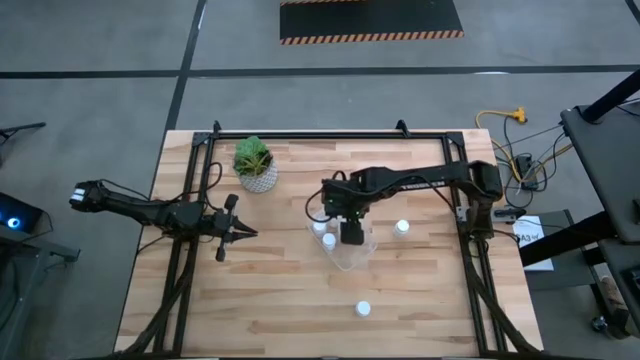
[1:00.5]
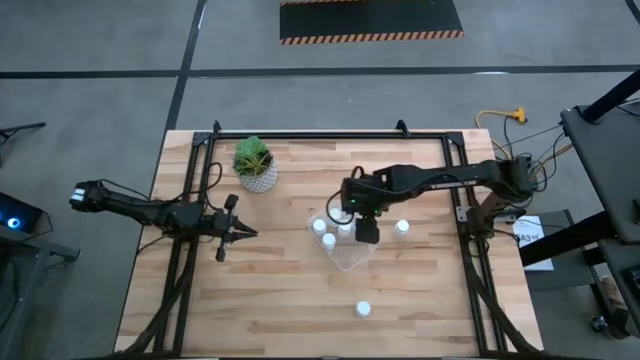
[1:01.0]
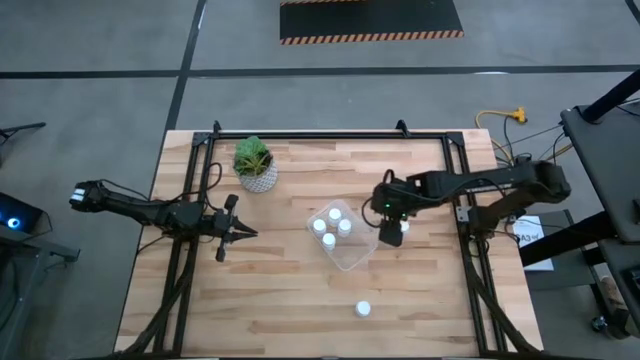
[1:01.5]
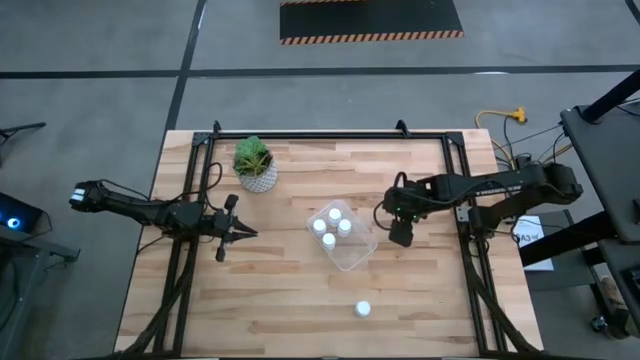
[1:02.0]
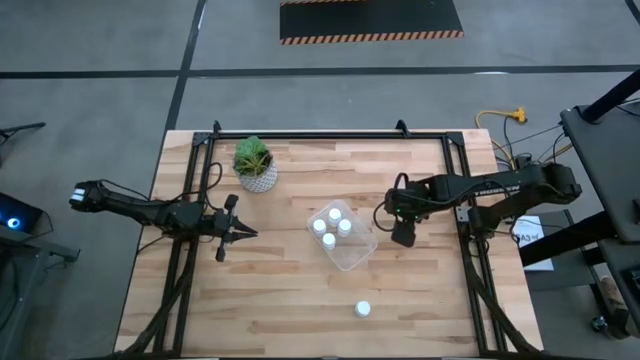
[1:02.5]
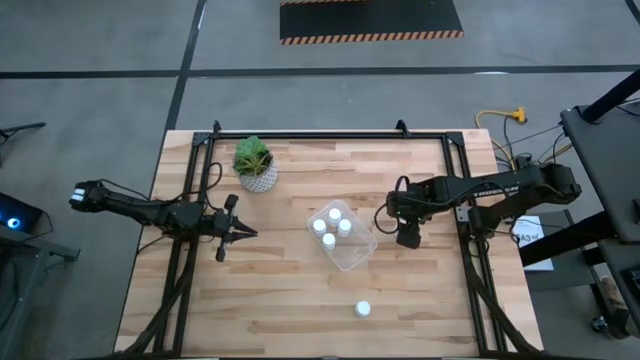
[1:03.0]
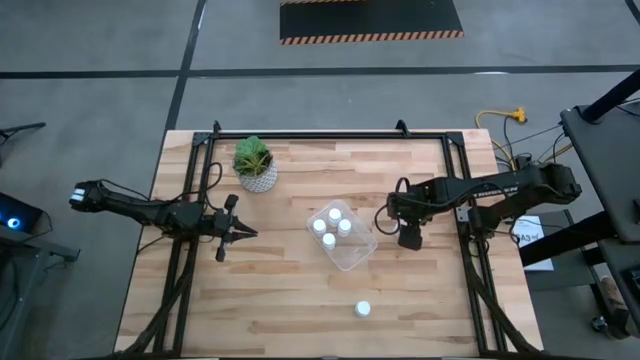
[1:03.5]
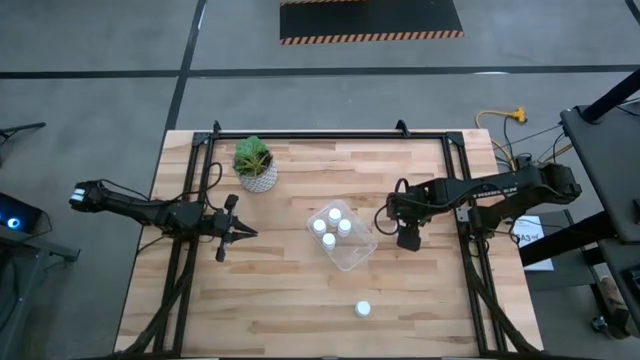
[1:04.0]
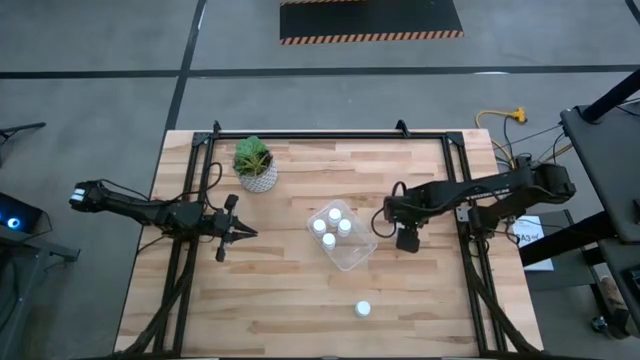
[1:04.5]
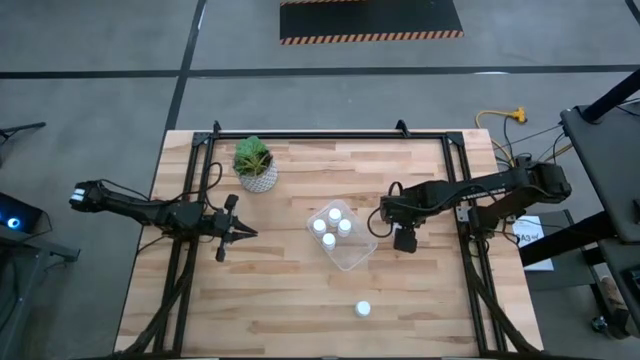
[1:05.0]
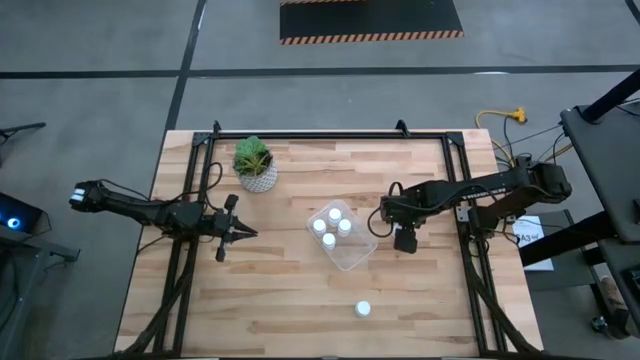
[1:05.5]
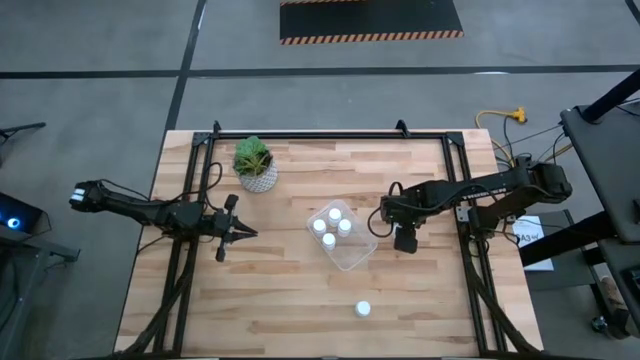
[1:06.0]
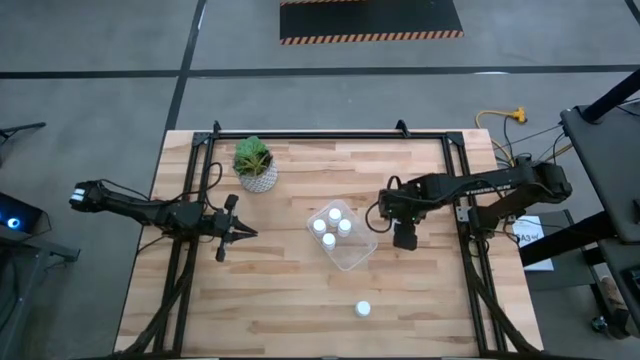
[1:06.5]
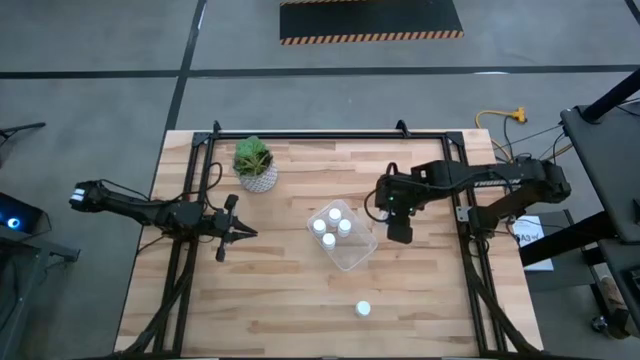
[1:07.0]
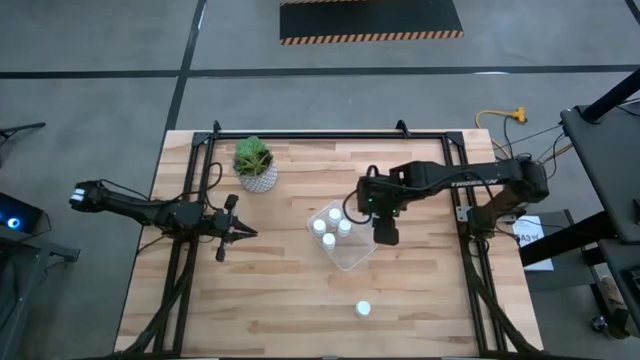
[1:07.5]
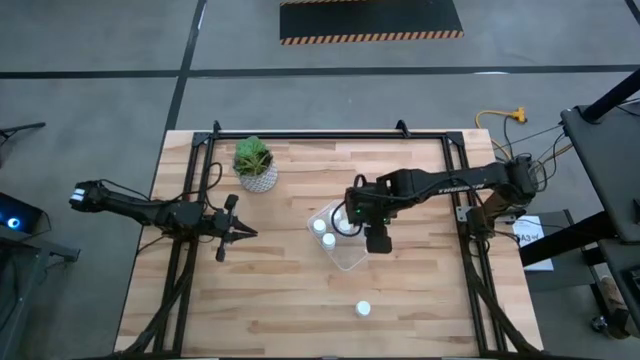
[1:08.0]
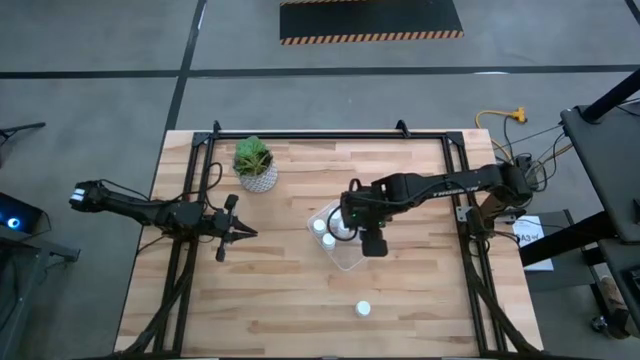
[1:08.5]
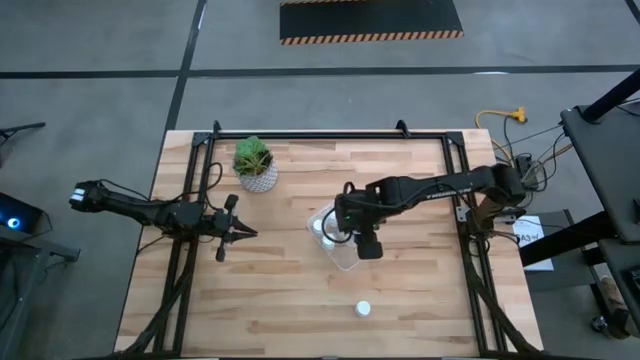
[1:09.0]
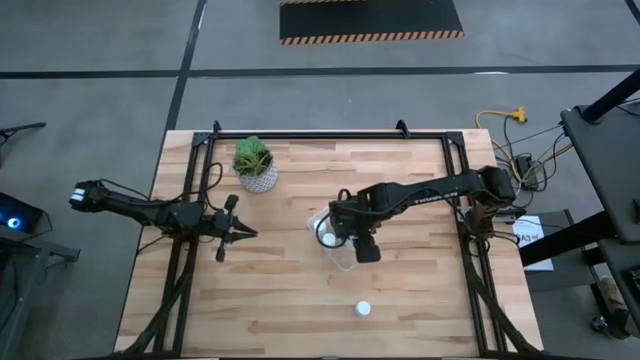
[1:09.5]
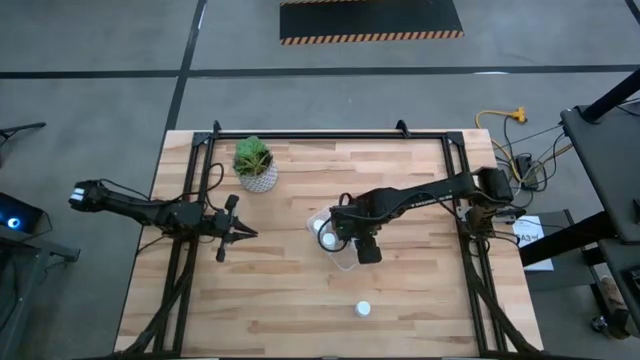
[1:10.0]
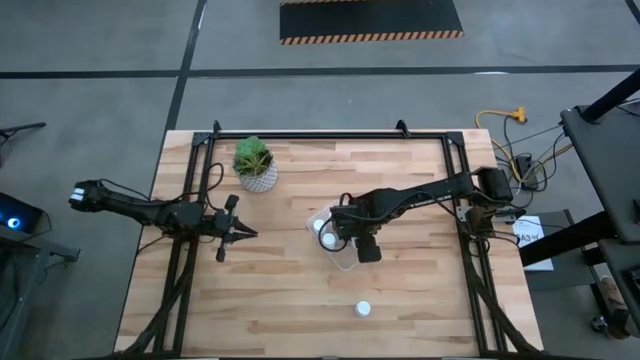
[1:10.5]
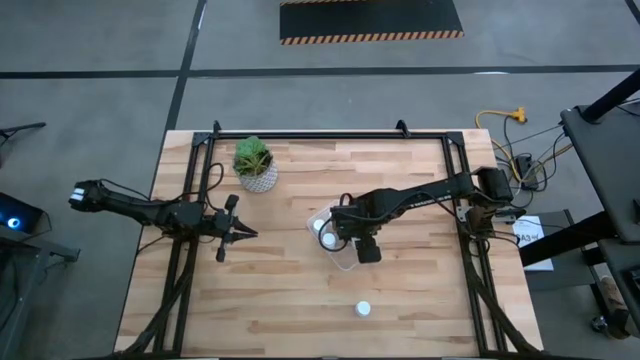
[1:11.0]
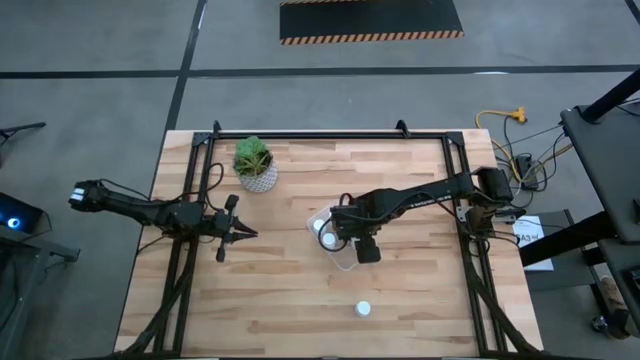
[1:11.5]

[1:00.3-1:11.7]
Task: Pick and place pill bottles into a basket
Put the white medicine bottle in the transparent bin

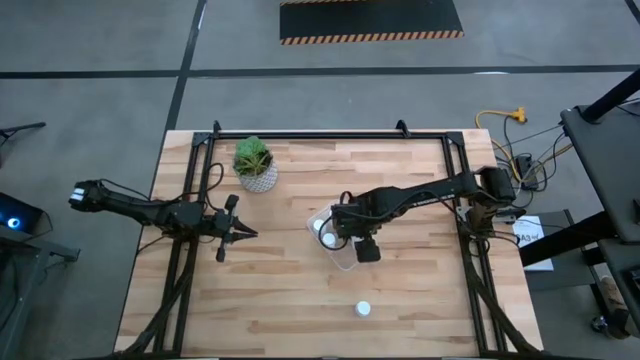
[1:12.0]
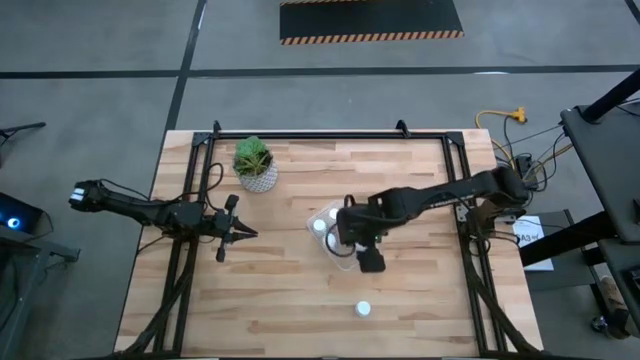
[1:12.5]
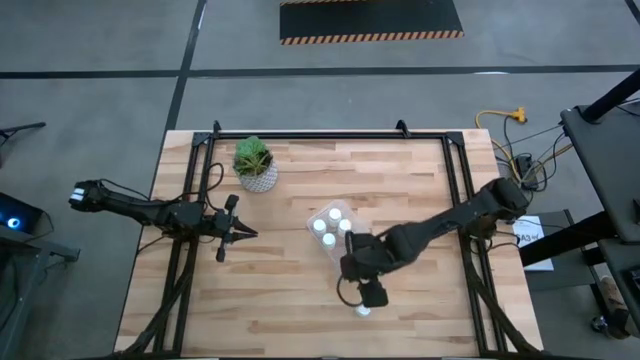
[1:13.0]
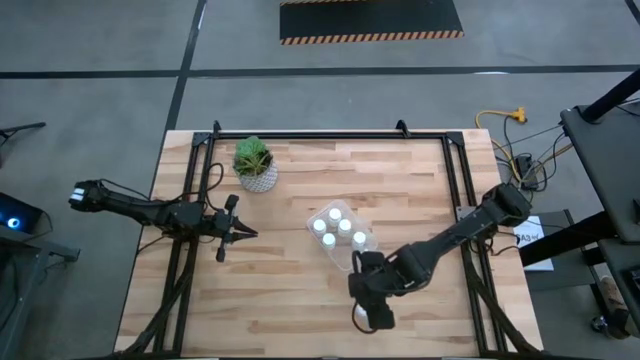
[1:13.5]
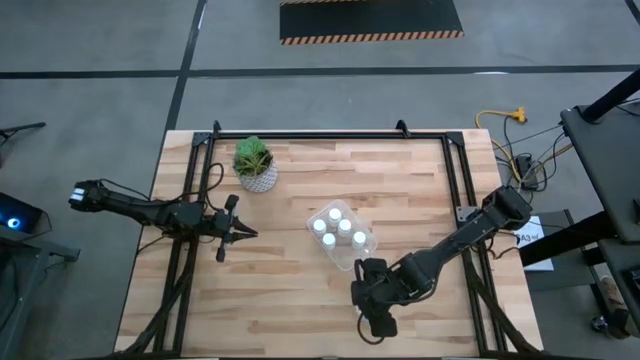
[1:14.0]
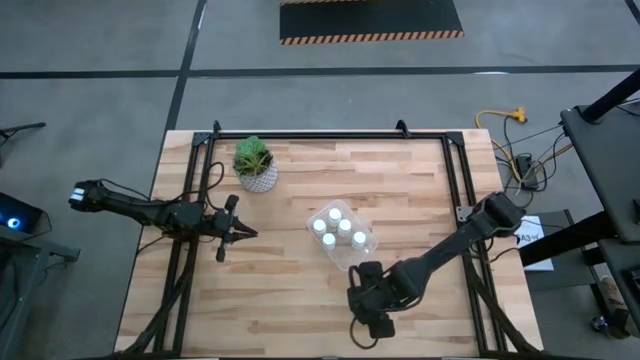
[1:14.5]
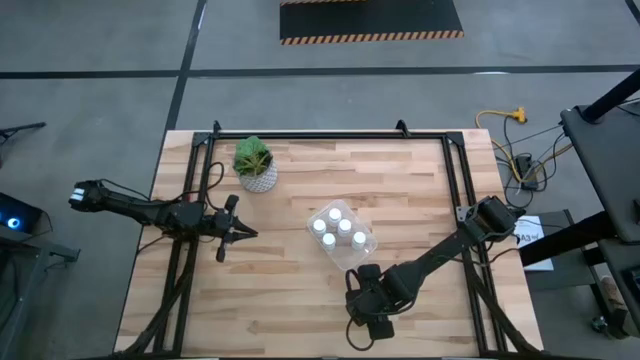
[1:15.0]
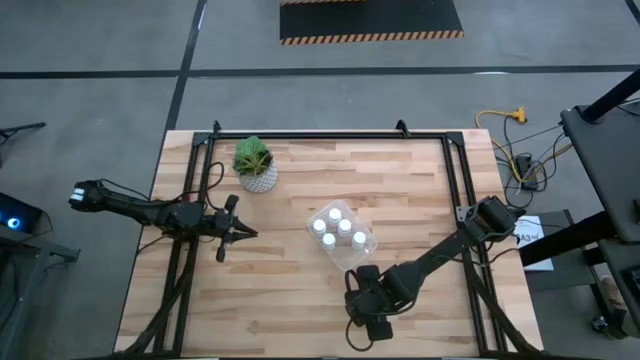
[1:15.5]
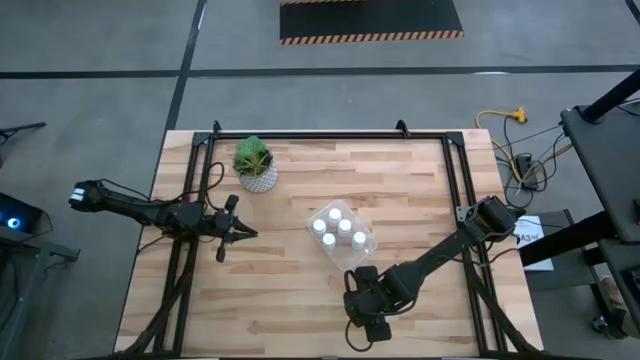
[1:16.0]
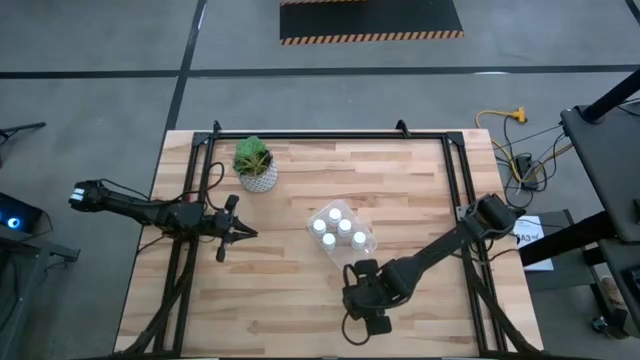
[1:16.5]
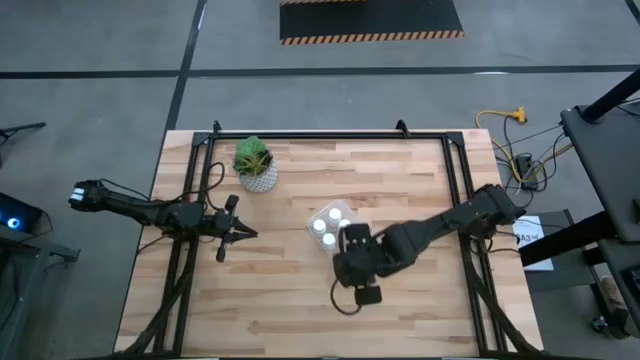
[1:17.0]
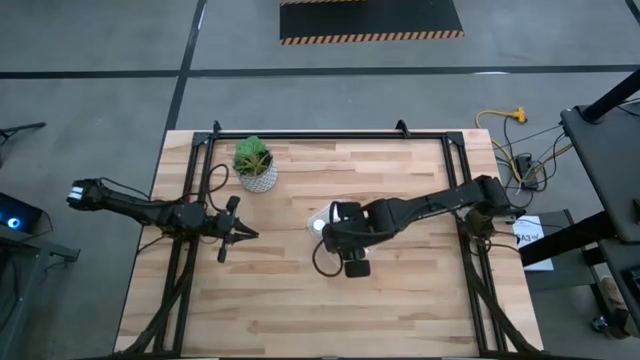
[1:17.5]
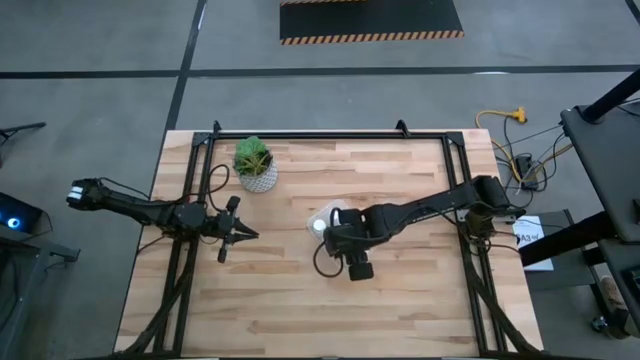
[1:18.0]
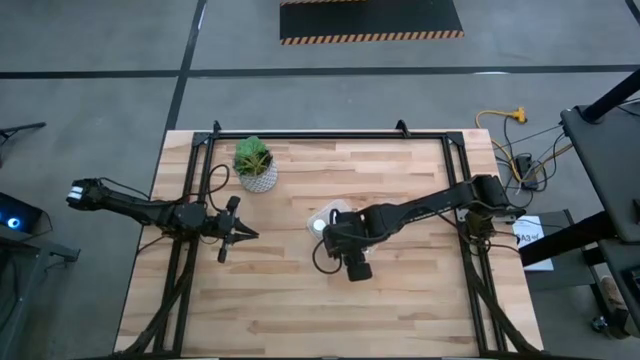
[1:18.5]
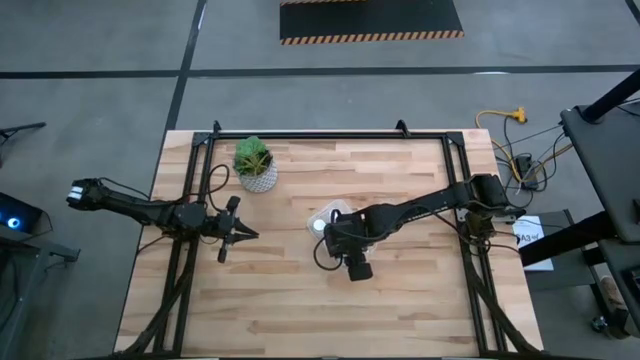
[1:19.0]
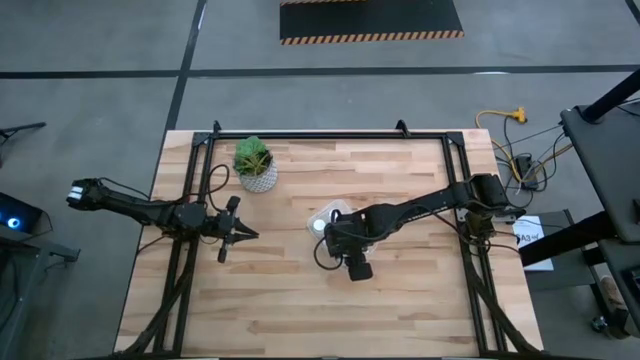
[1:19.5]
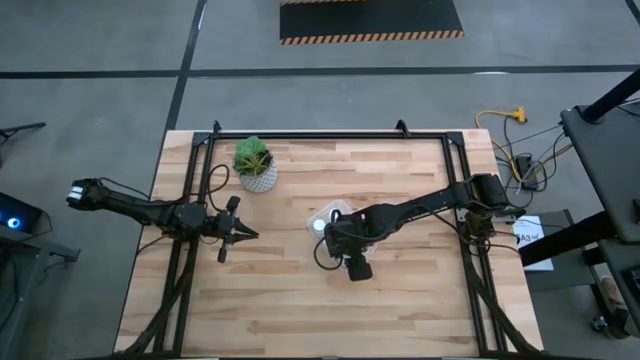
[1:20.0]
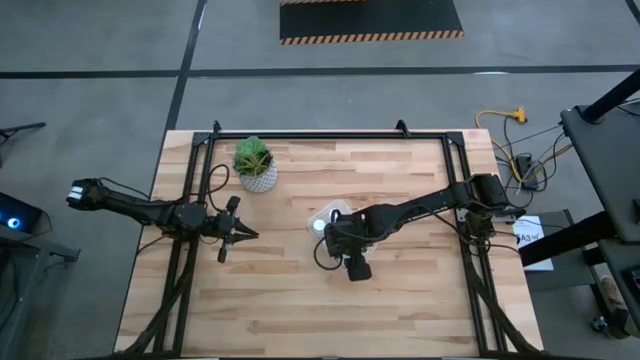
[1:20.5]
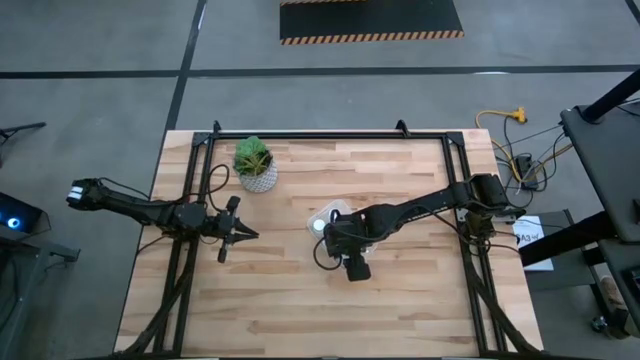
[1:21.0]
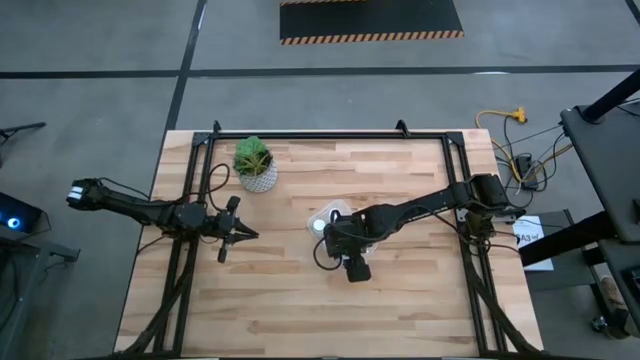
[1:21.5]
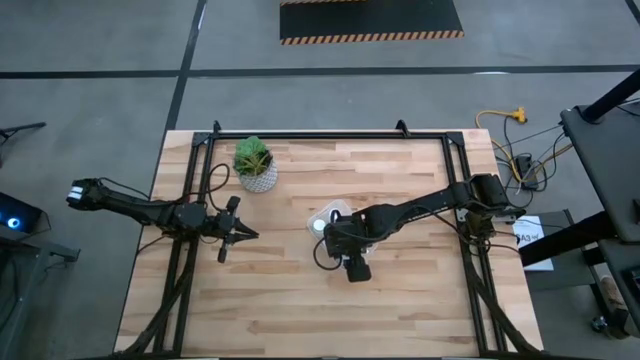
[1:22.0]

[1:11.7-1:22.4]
Put the white medicine bottle in the transparent bin
